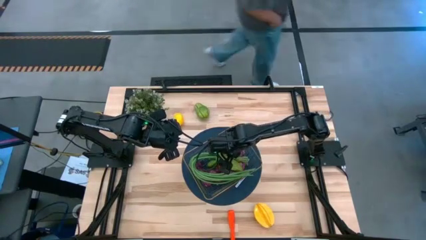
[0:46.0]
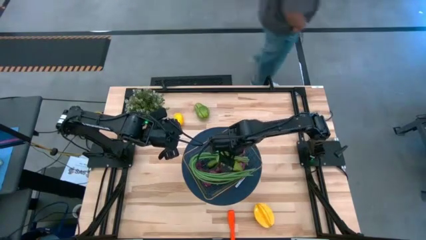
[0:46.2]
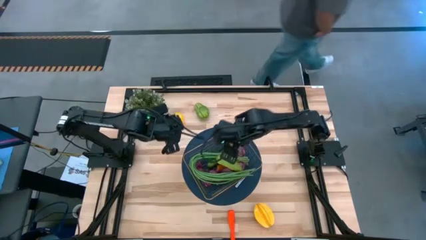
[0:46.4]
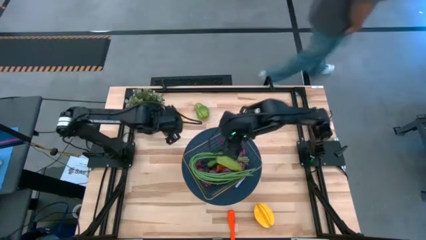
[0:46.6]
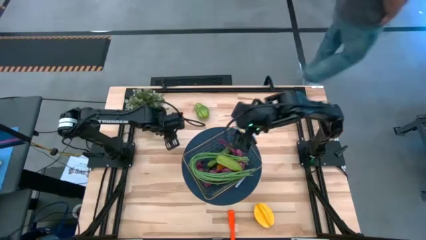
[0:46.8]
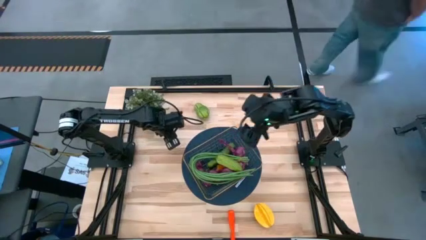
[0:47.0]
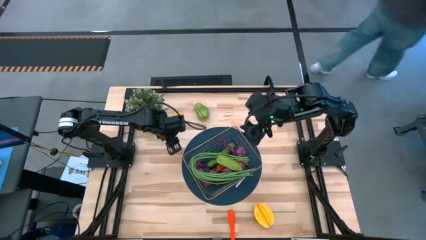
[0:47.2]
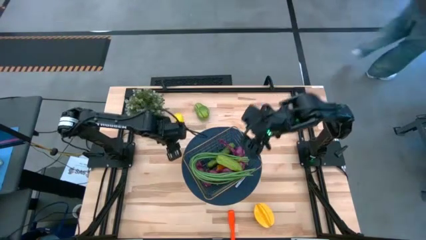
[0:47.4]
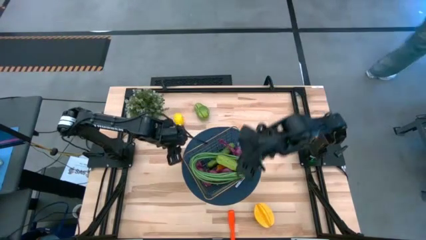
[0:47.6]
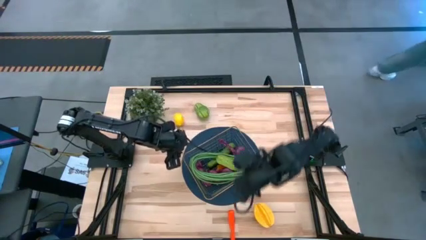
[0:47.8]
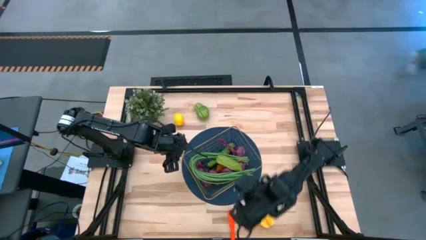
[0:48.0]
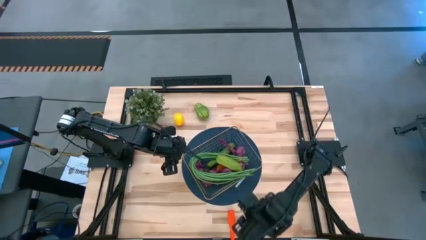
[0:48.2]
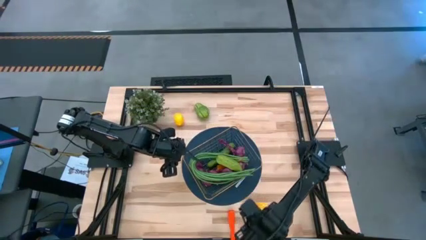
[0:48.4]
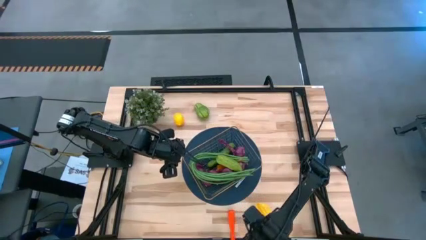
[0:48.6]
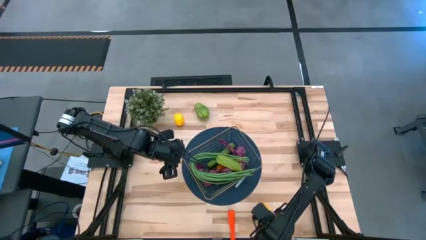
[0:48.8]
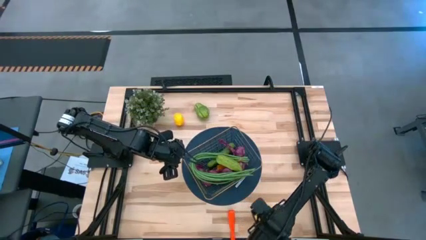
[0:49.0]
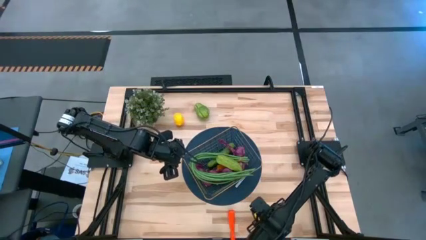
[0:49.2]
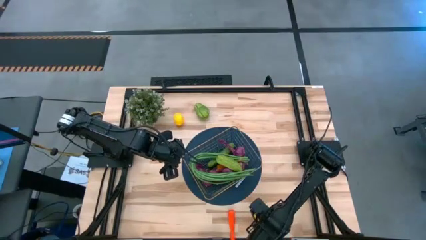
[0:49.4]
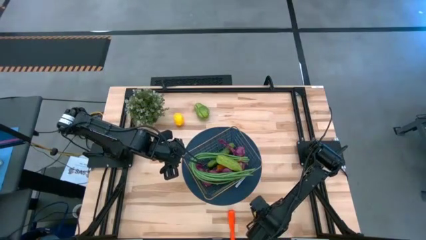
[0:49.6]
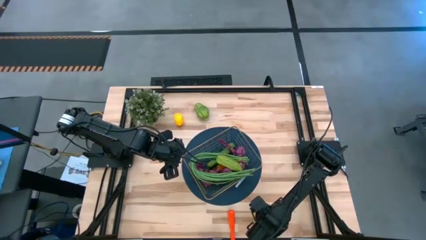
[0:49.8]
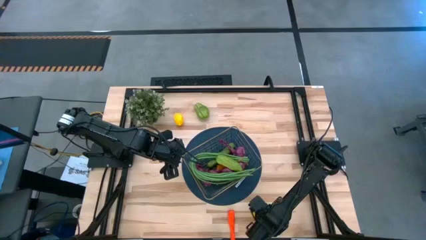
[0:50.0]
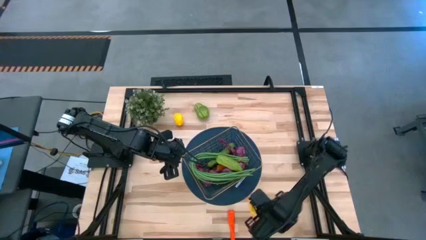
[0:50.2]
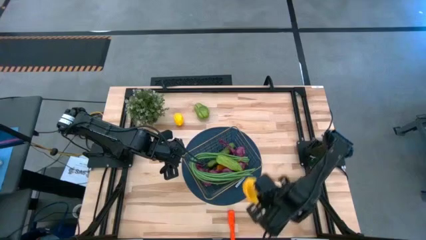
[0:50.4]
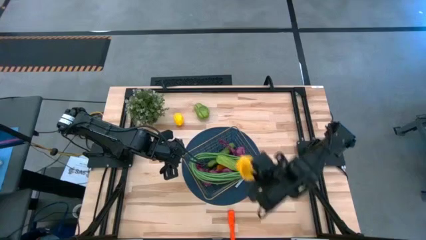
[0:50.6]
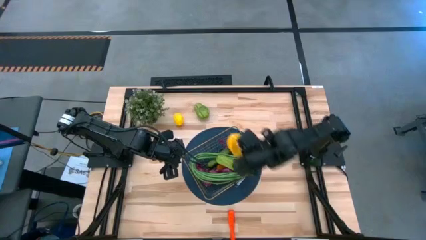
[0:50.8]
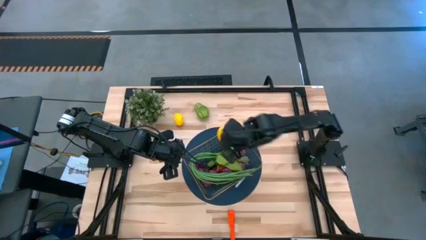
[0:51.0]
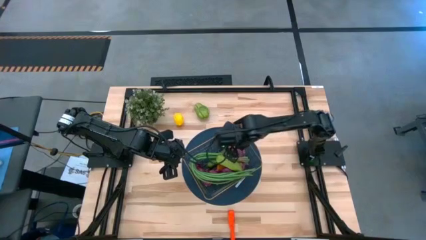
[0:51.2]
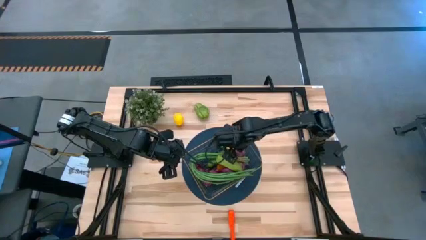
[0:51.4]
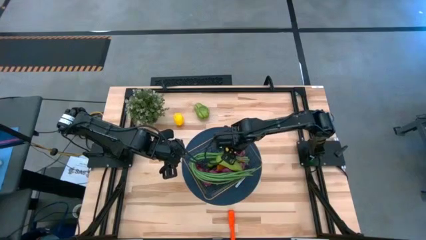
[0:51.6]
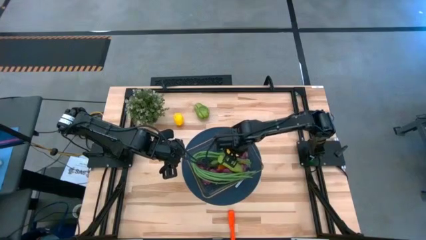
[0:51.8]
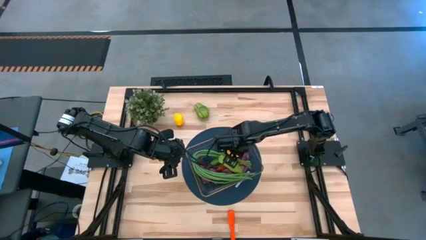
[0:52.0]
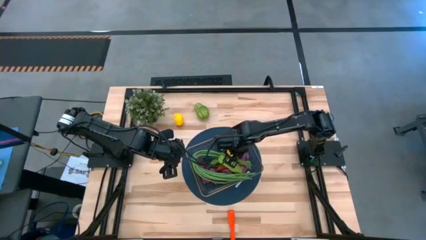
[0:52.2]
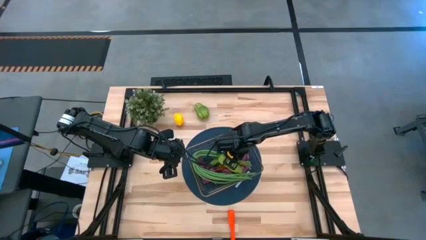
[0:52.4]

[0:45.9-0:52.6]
Task: Build produce basket
Put the yellow starfruit into the gold wire basket

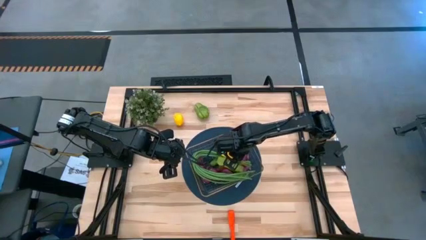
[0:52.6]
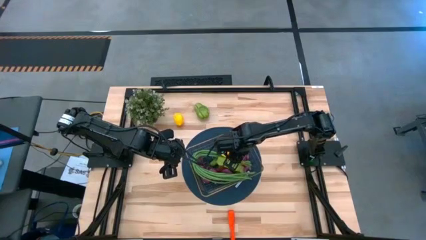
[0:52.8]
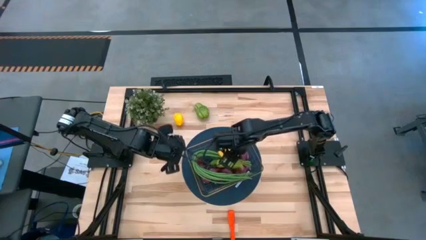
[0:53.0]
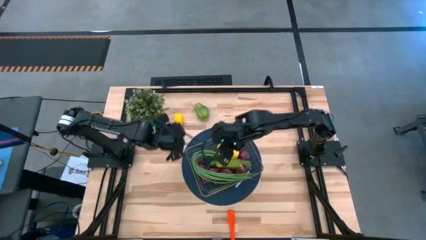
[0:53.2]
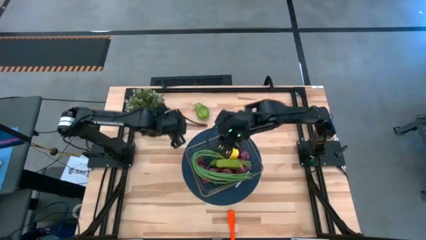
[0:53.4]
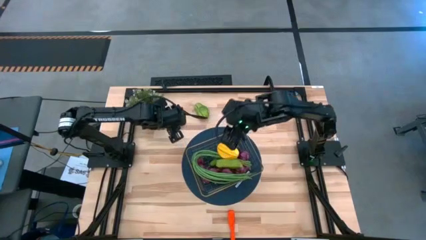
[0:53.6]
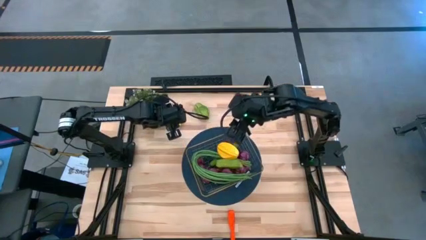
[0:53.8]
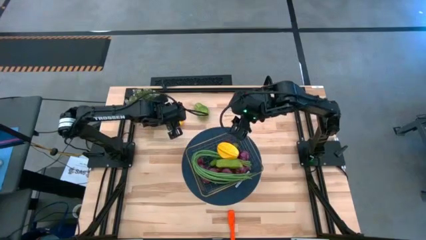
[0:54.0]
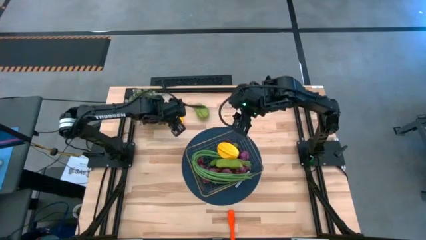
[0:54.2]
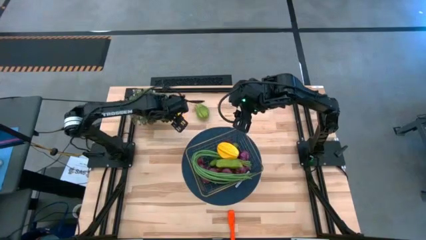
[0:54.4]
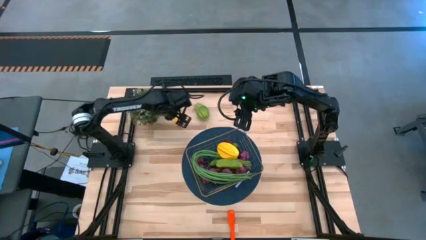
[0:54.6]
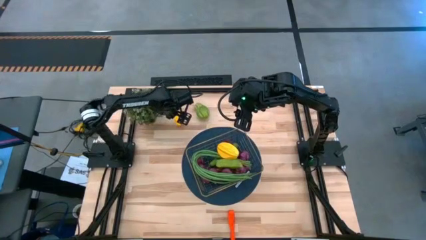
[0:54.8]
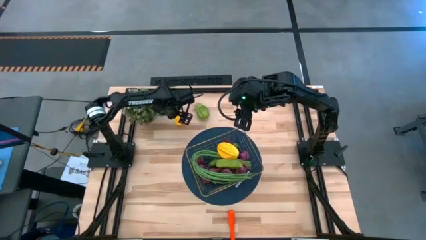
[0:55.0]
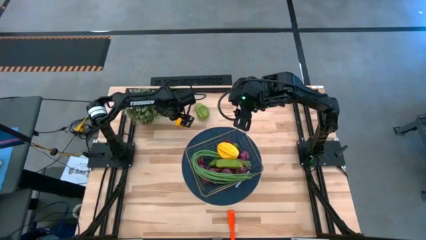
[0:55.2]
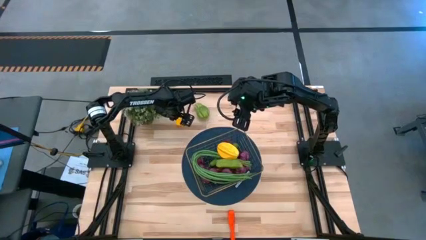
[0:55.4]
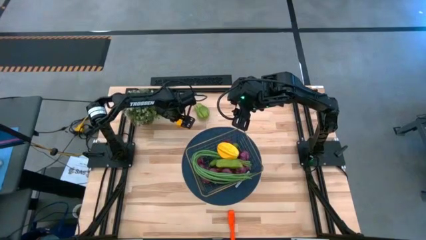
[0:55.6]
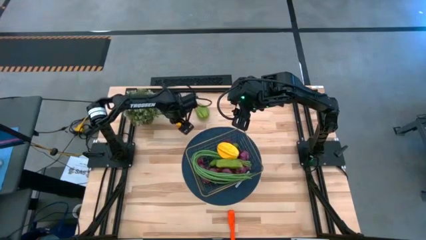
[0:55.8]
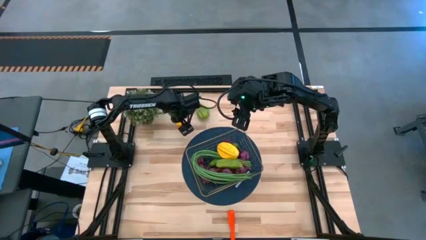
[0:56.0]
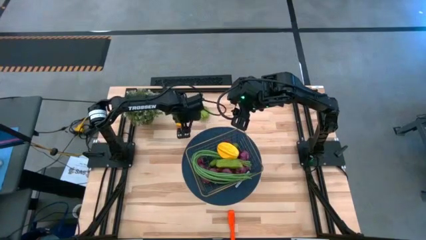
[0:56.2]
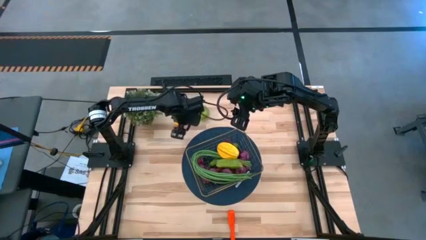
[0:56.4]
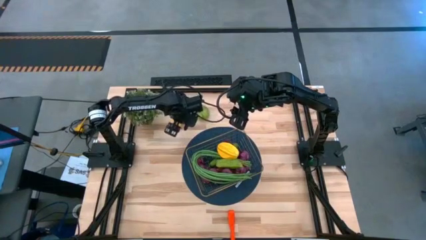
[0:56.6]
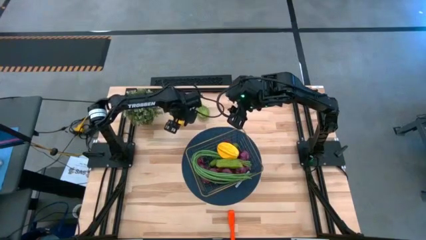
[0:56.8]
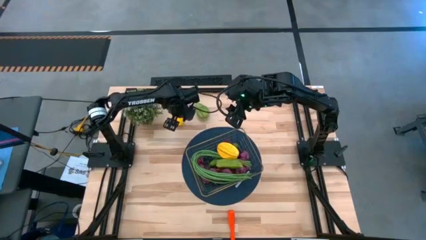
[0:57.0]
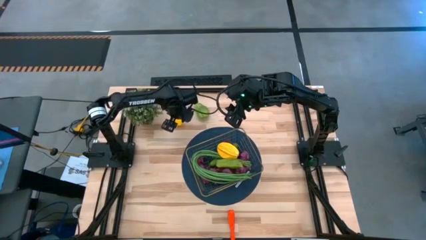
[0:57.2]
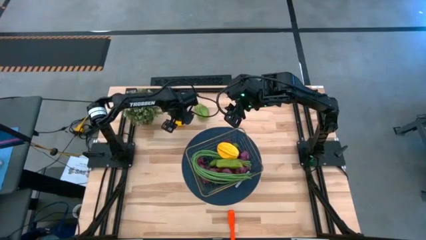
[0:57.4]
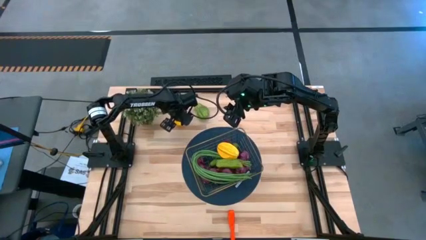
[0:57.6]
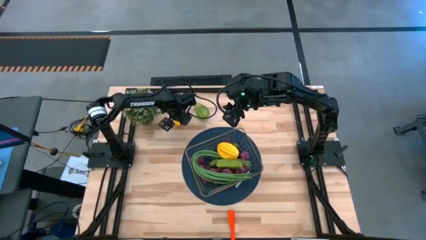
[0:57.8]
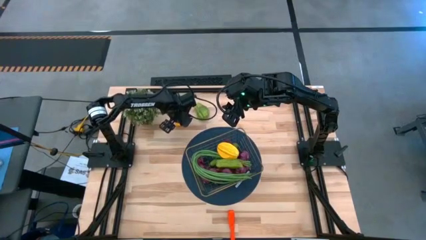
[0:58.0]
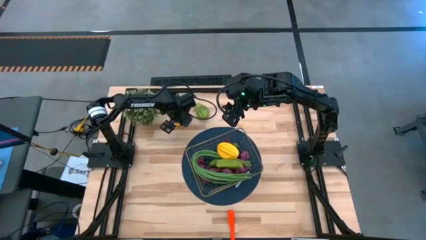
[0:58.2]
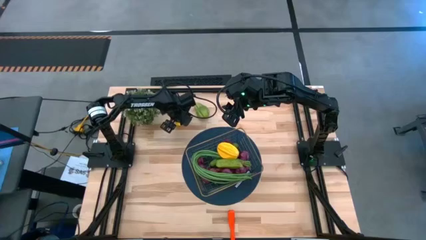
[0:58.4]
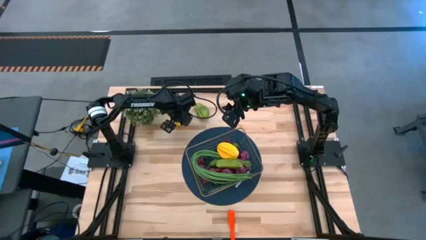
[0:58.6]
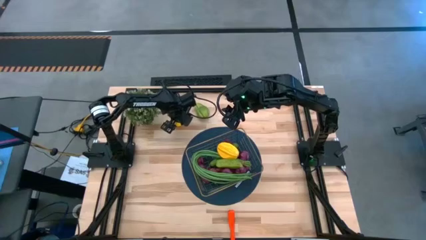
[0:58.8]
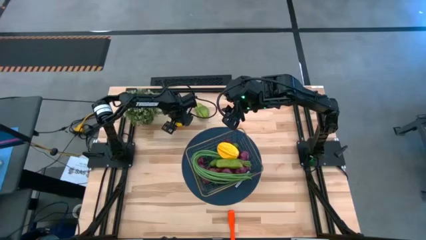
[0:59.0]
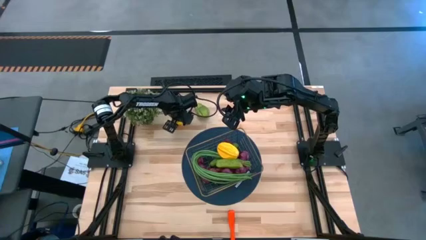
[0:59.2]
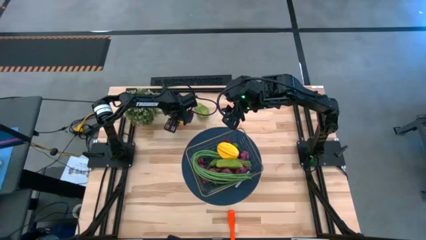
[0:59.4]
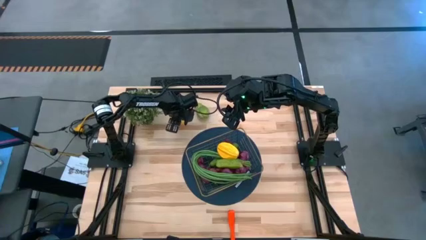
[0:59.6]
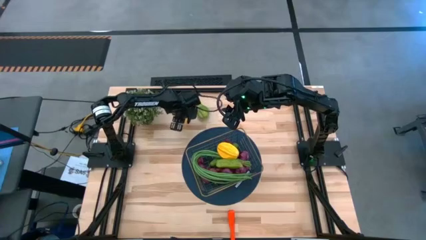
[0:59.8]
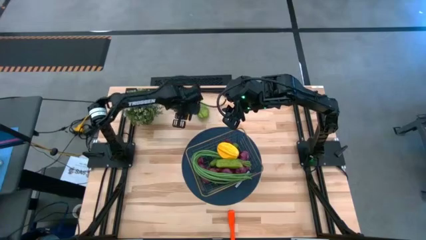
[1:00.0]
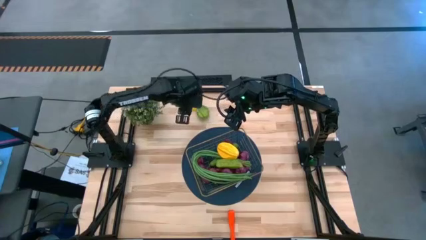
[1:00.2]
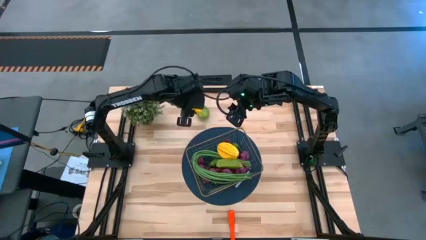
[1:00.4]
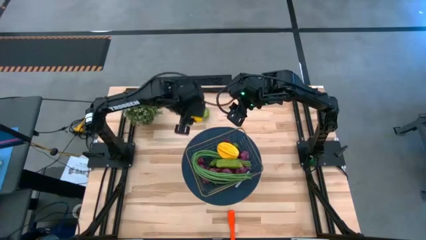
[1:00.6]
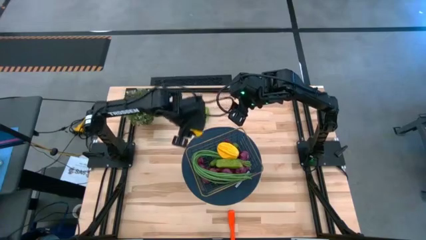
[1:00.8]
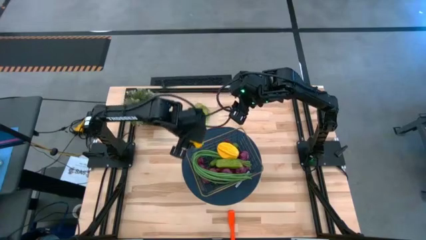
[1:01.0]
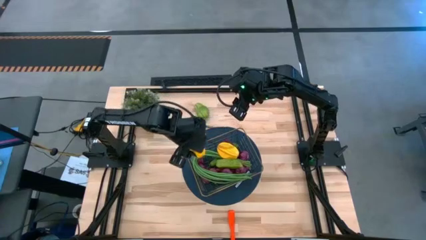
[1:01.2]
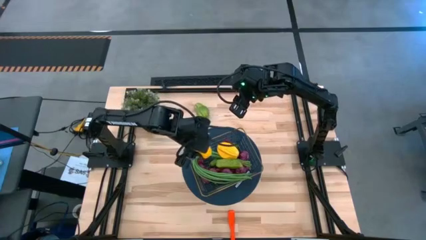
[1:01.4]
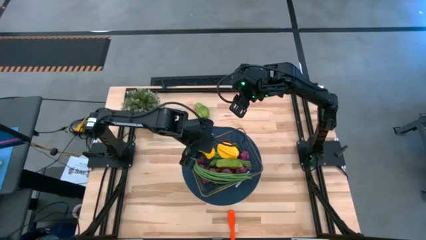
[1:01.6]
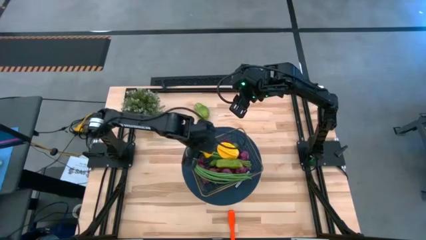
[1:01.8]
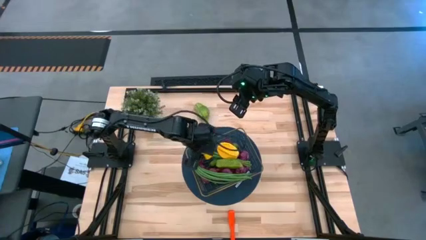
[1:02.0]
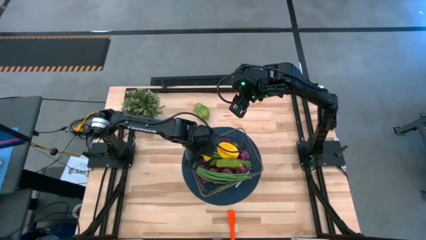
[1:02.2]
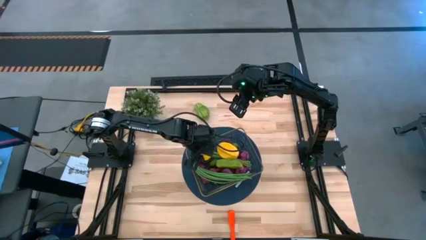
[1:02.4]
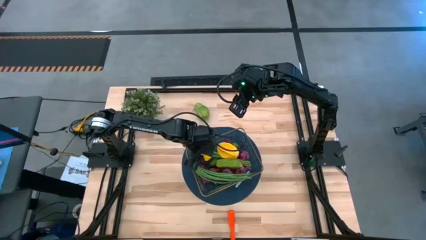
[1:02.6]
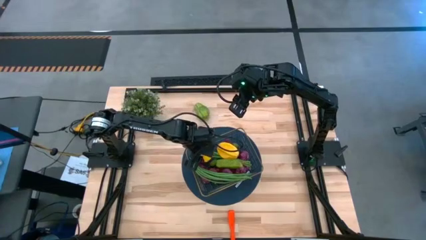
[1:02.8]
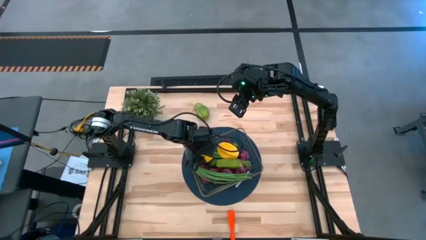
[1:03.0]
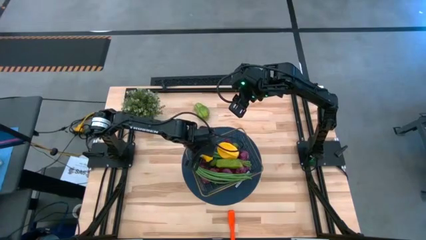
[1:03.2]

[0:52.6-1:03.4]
Put the yellow lemon into the gold wire basket
